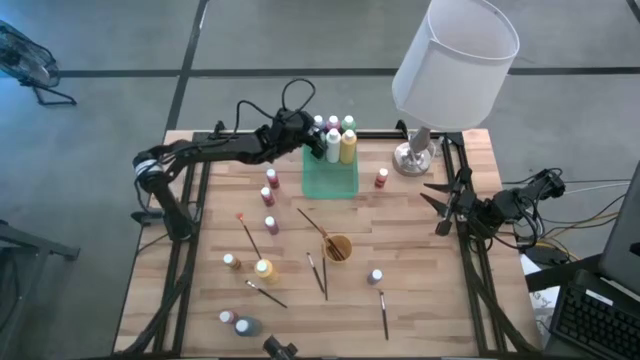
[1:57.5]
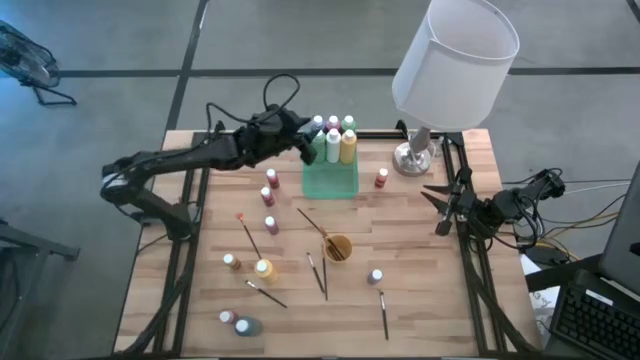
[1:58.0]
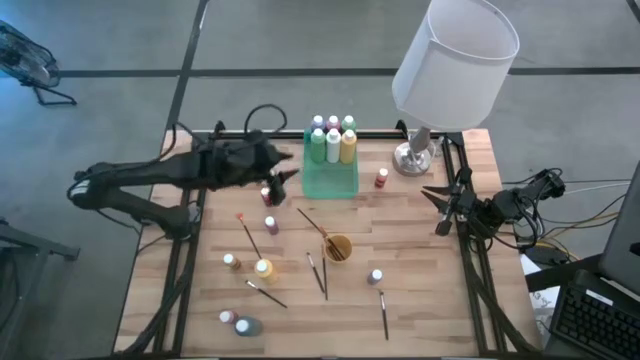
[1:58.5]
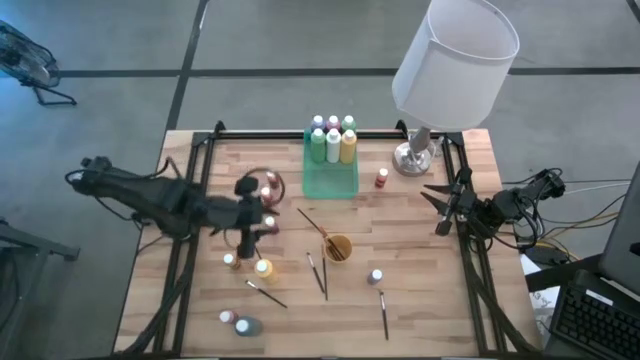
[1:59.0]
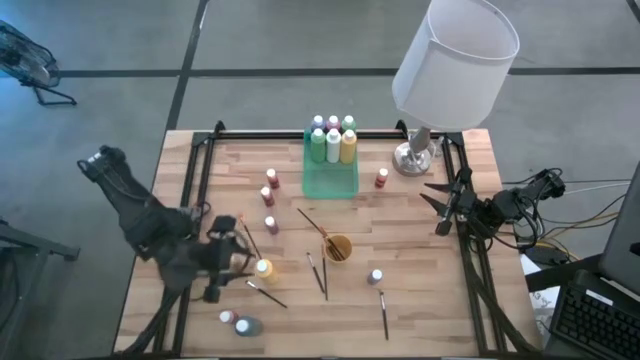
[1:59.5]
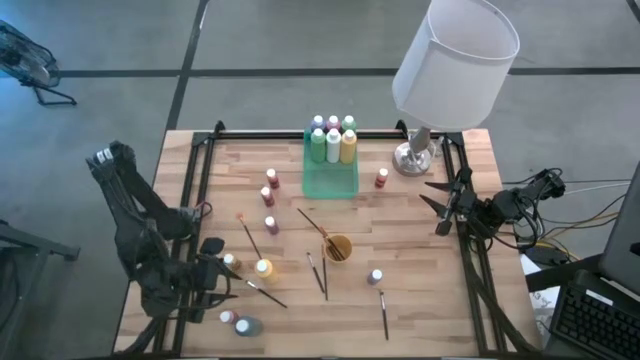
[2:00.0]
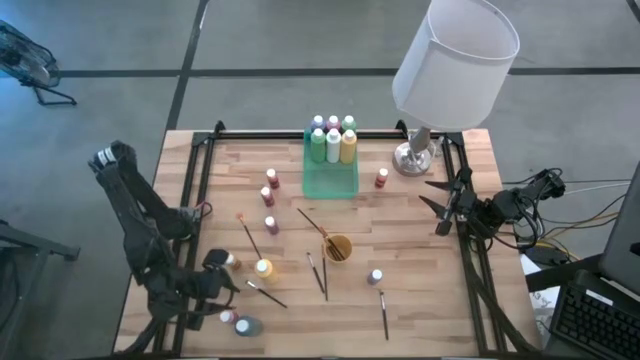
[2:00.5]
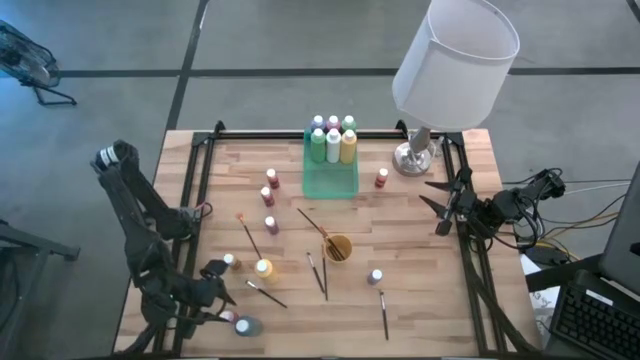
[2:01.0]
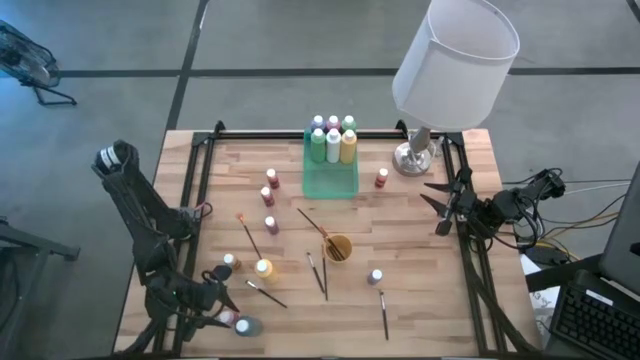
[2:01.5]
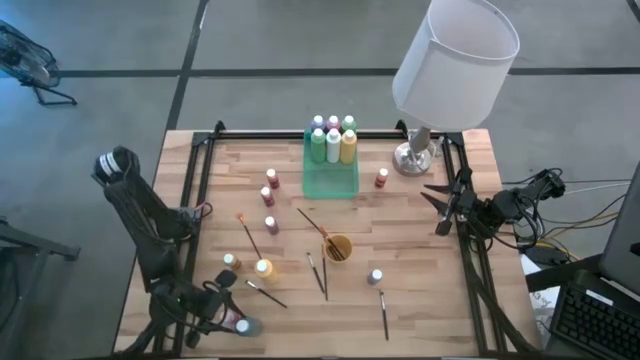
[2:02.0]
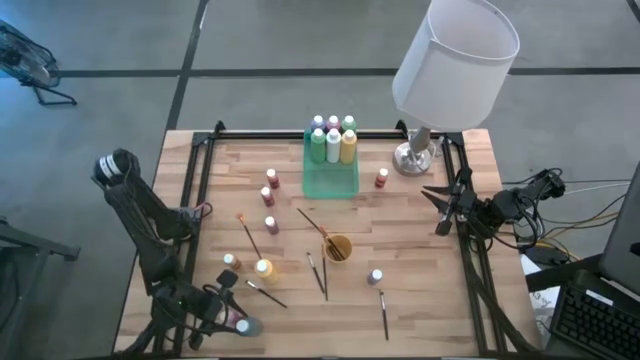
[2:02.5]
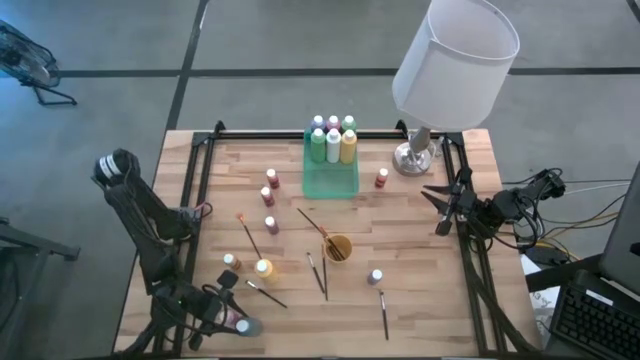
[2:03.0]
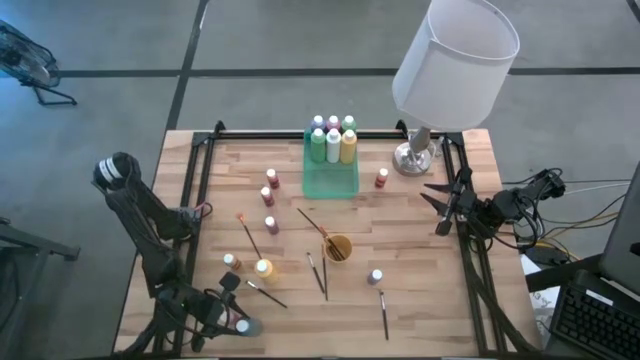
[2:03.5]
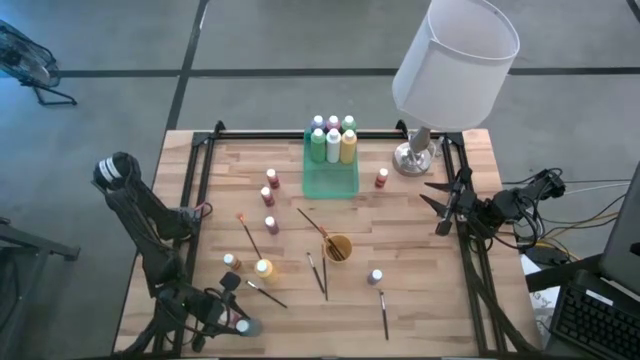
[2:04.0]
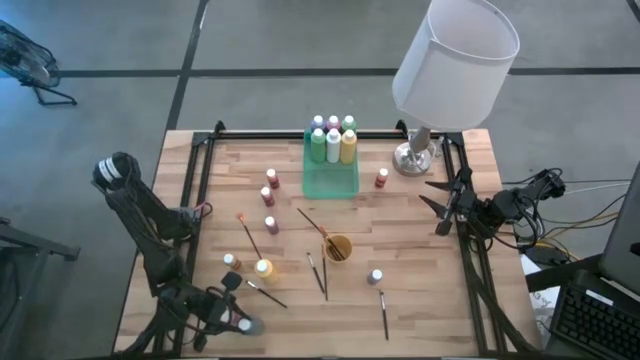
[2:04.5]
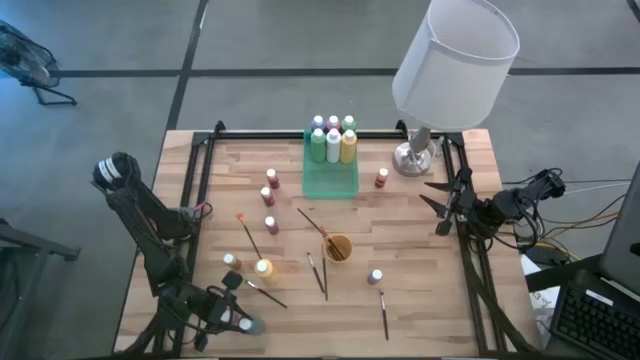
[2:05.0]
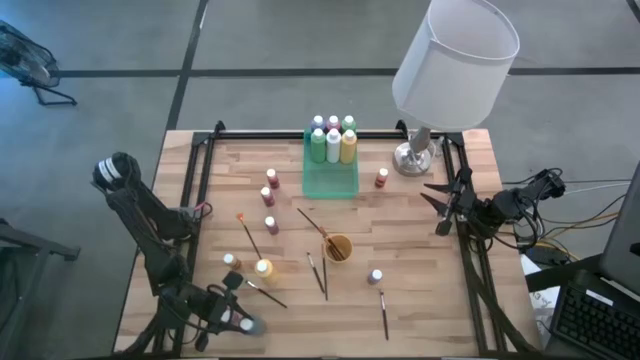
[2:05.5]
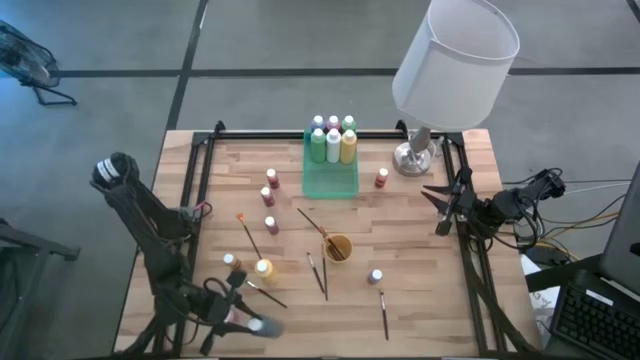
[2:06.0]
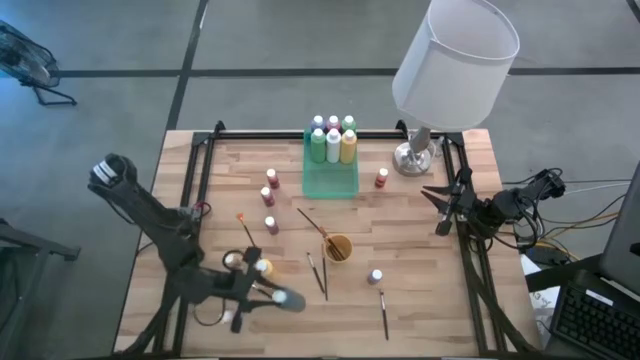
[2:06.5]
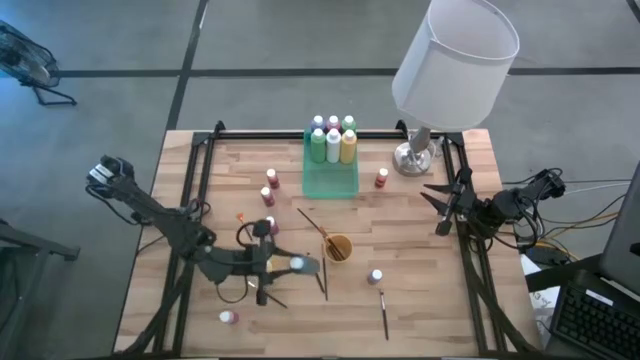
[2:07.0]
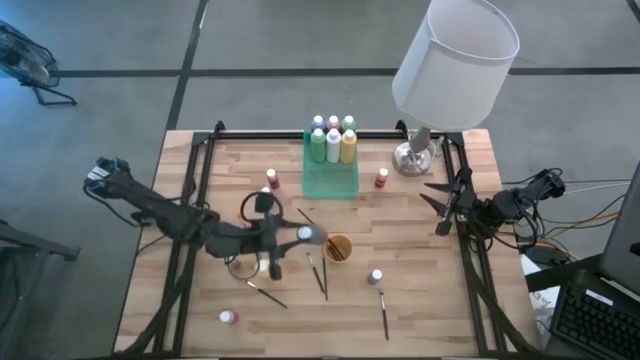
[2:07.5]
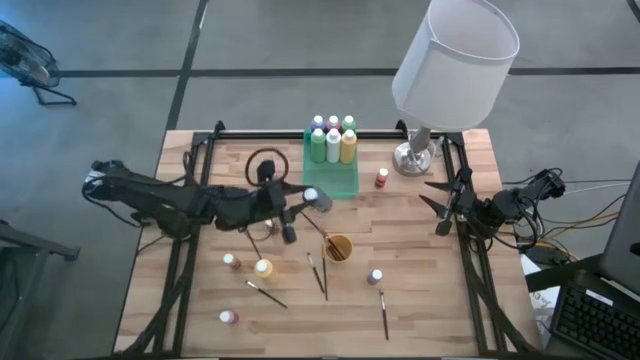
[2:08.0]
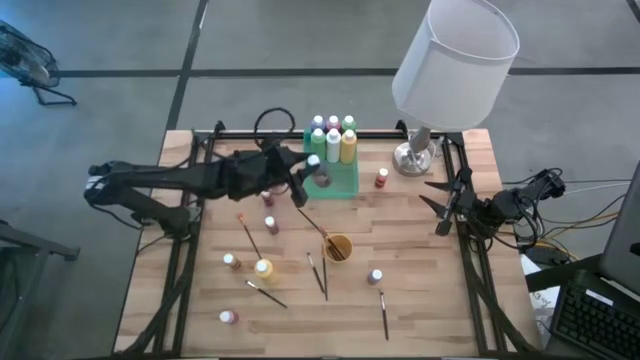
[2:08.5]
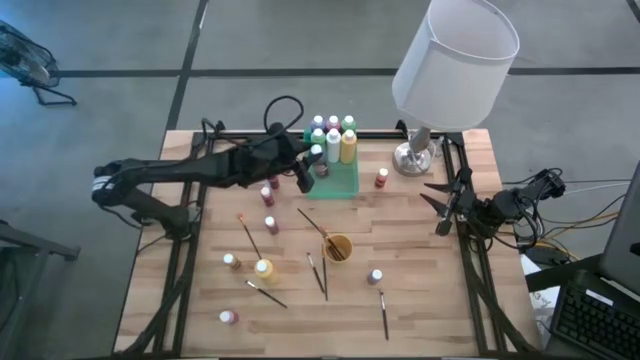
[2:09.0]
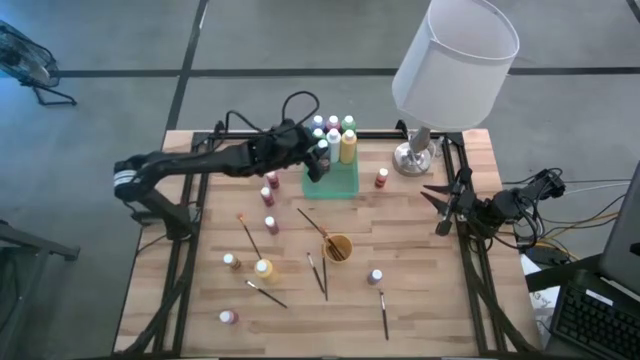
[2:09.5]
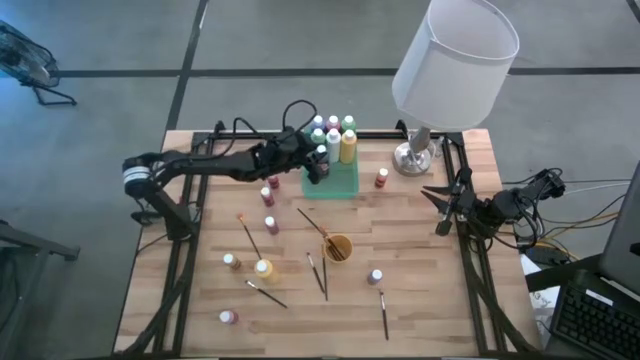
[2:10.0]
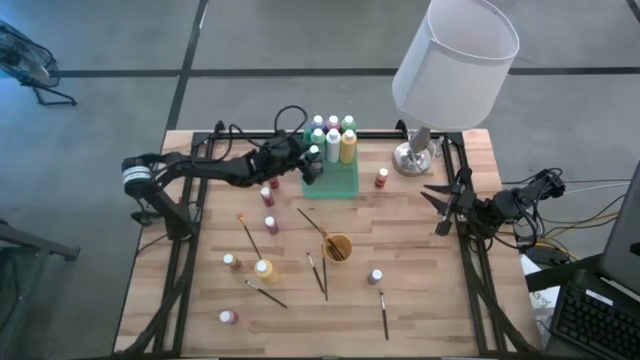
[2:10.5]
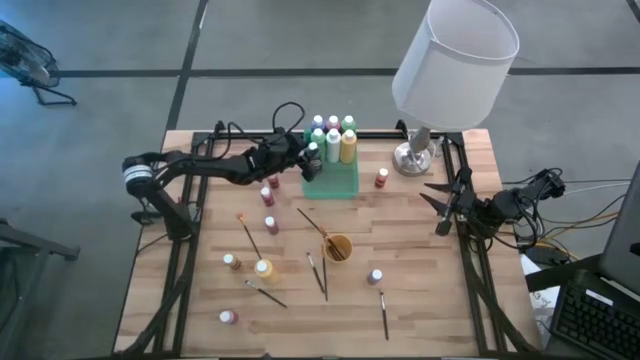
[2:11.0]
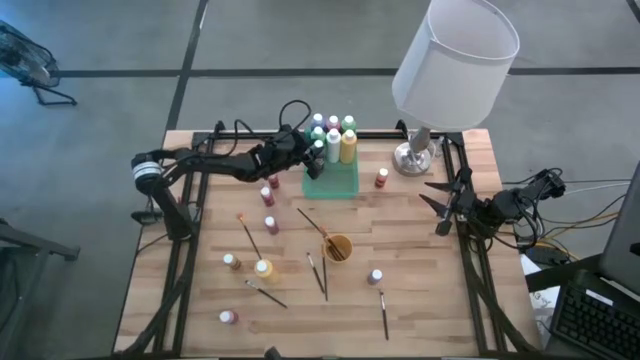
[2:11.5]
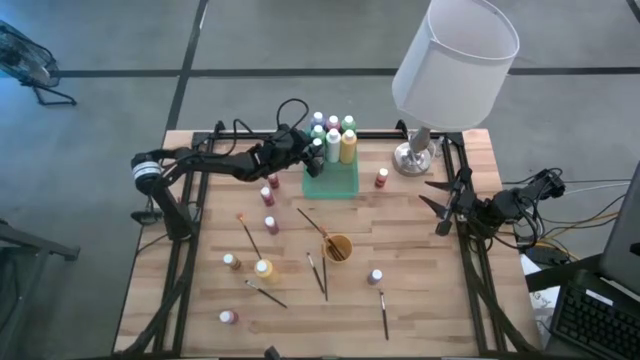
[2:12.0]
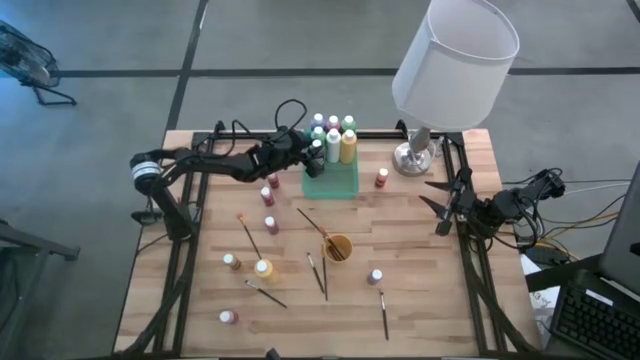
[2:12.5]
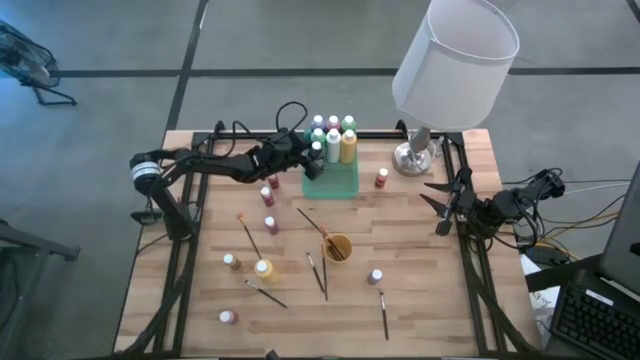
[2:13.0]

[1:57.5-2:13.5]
Task: Pick & Place Paint Supplies
Put the black paint bottle into the green bin

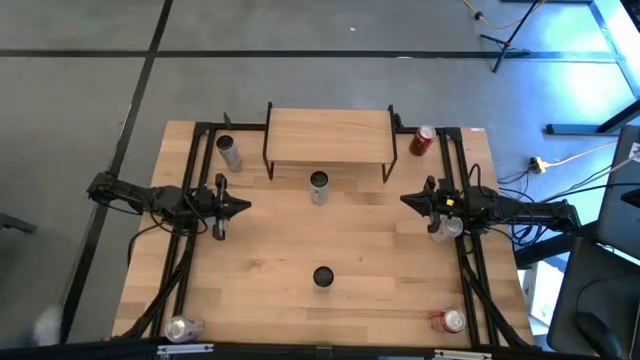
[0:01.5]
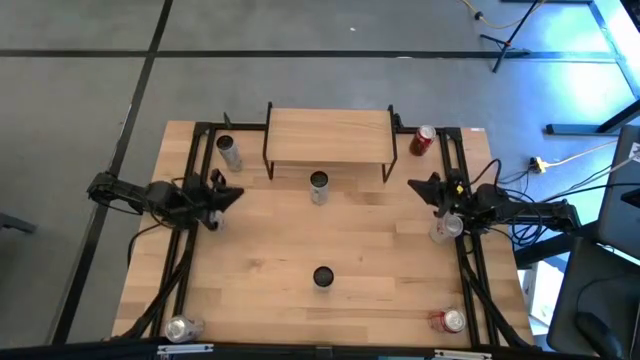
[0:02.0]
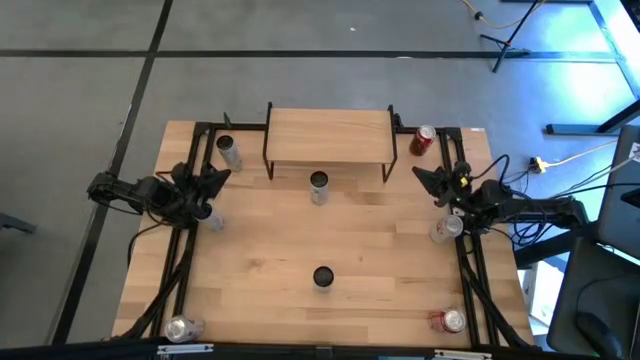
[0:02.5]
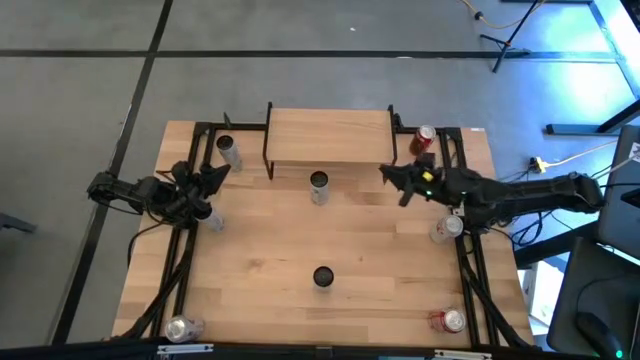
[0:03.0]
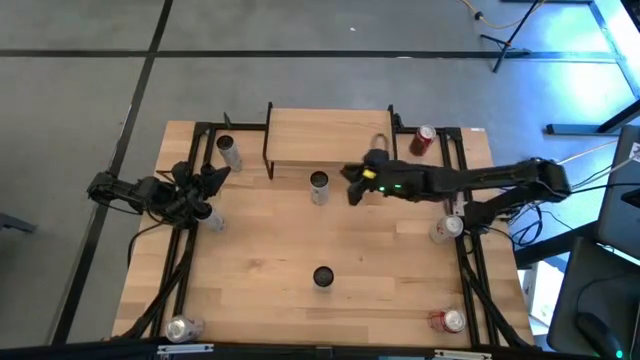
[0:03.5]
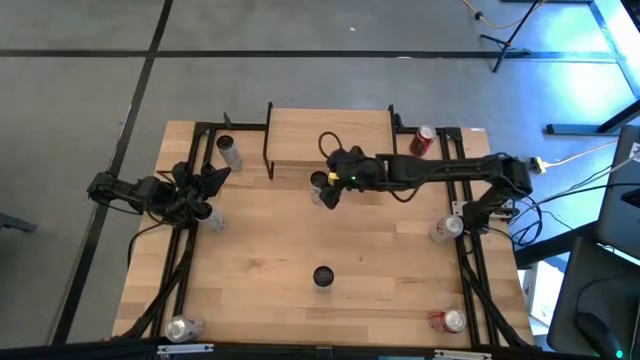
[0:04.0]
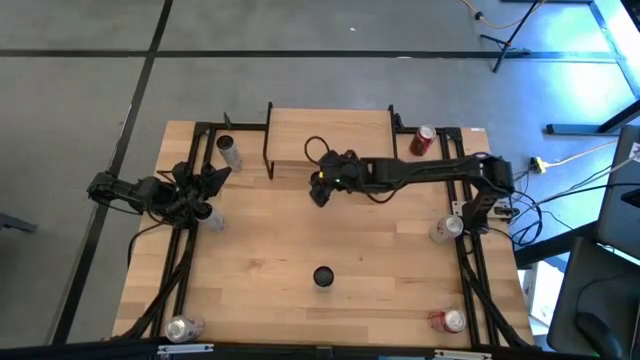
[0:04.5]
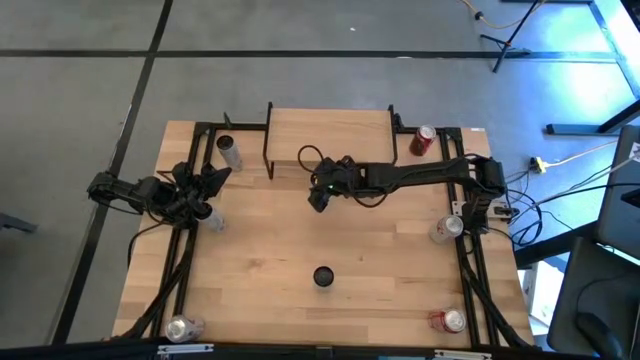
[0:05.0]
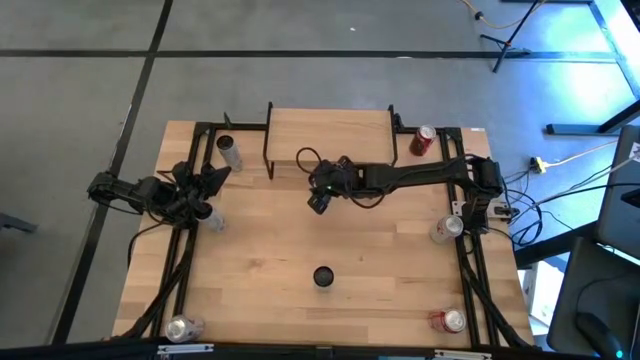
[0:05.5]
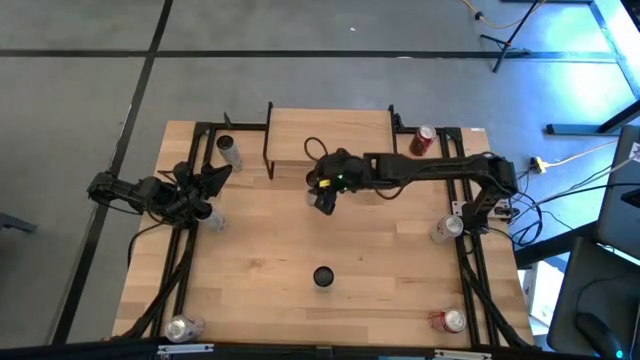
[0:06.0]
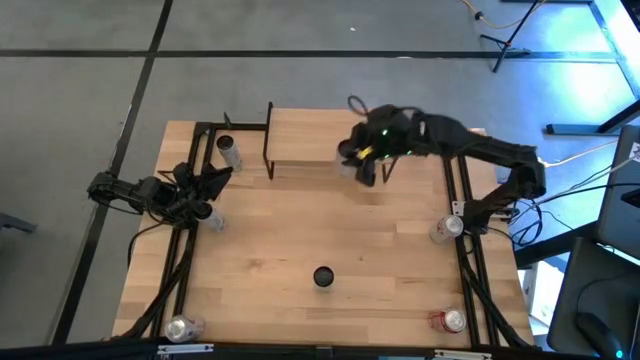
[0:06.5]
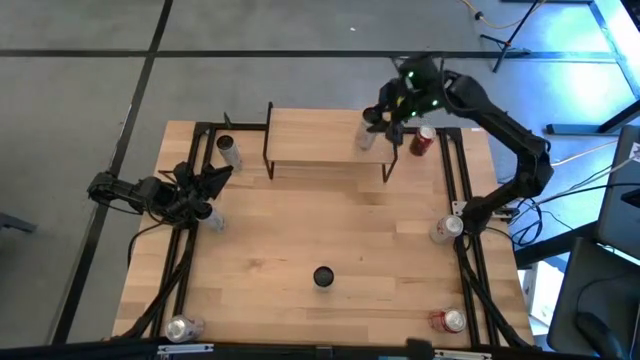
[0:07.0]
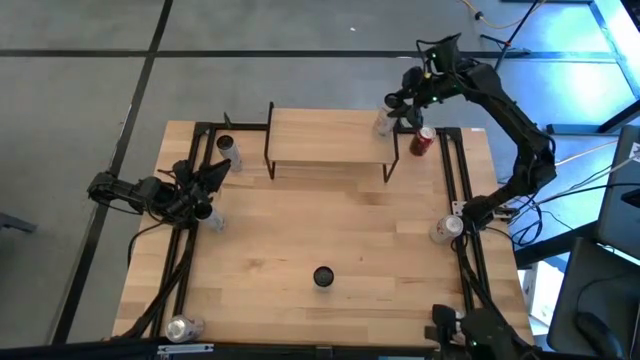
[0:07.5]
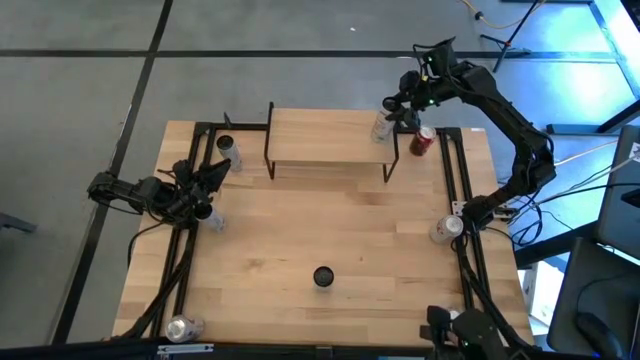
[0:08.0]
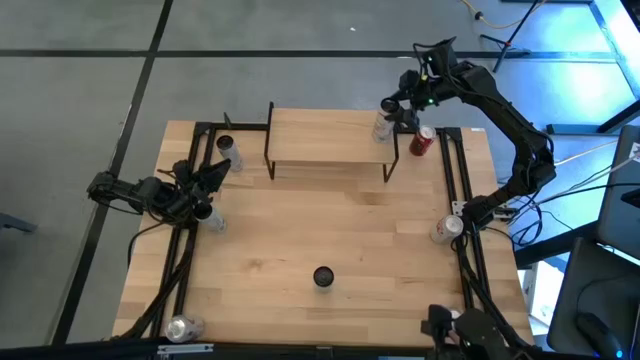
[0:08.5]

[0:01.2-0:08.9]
Task: Place canned beverage on shelf
Put the bottom white-pink soda can on the shelf
